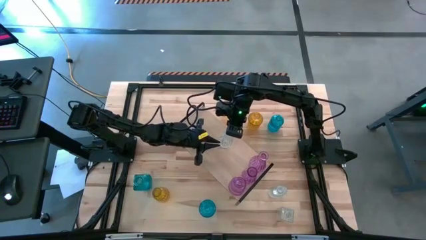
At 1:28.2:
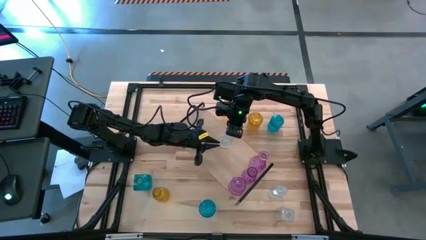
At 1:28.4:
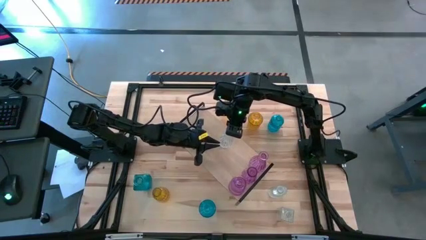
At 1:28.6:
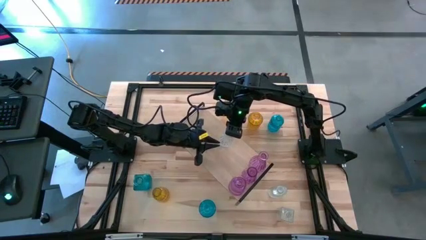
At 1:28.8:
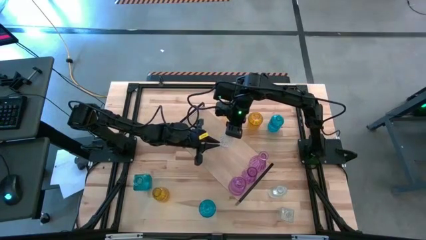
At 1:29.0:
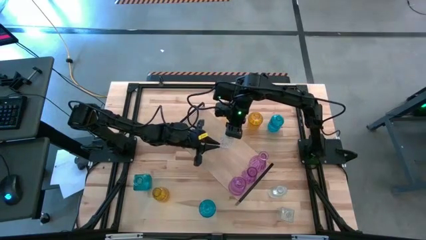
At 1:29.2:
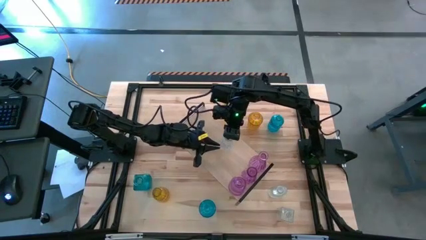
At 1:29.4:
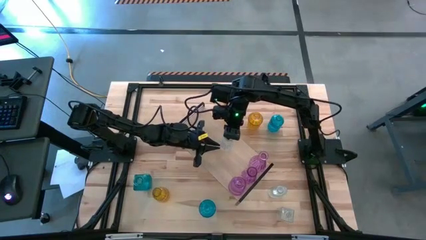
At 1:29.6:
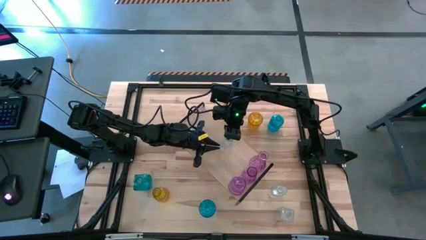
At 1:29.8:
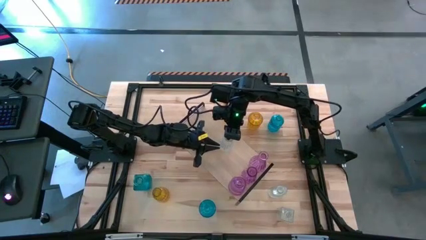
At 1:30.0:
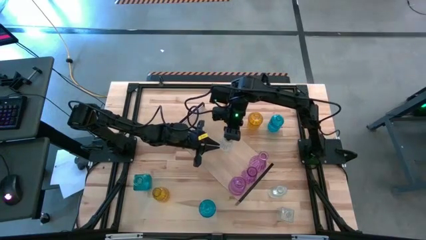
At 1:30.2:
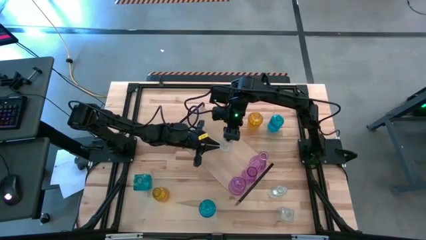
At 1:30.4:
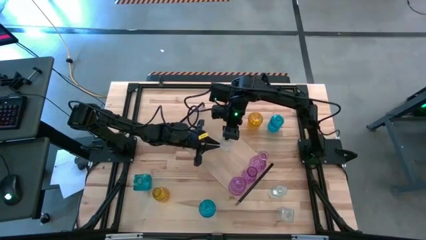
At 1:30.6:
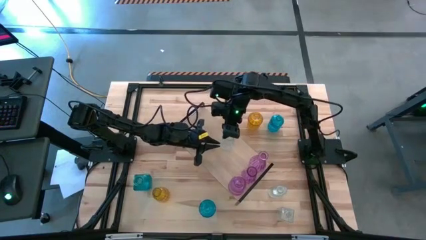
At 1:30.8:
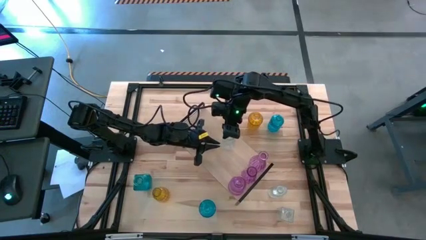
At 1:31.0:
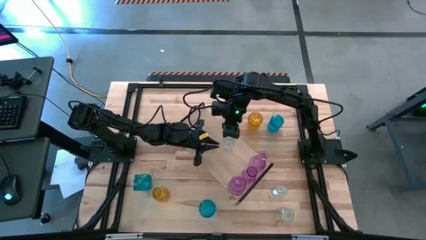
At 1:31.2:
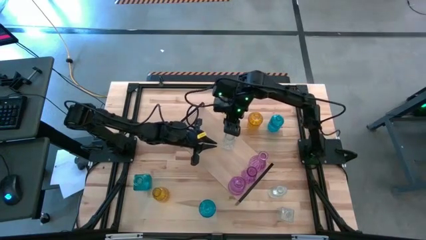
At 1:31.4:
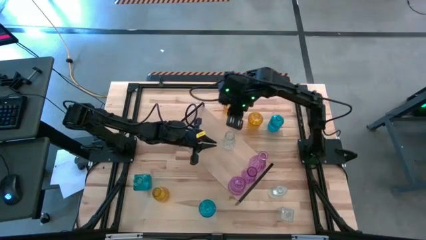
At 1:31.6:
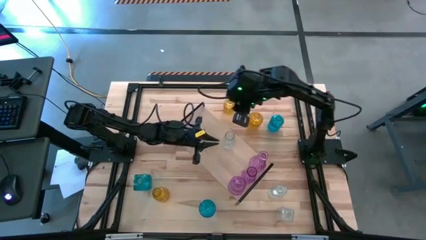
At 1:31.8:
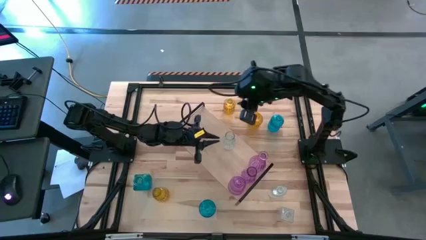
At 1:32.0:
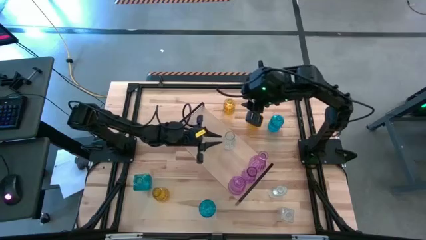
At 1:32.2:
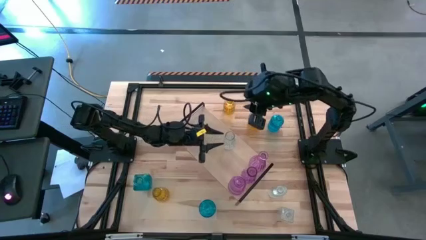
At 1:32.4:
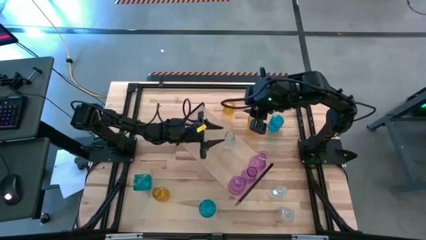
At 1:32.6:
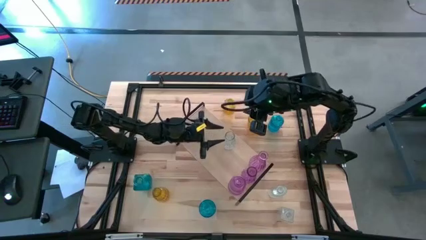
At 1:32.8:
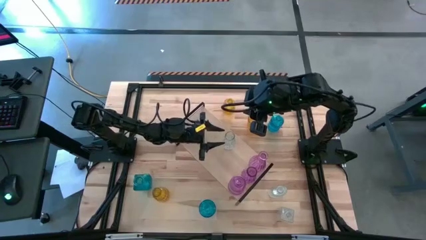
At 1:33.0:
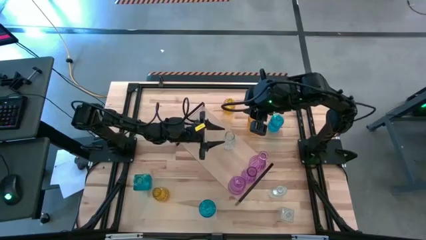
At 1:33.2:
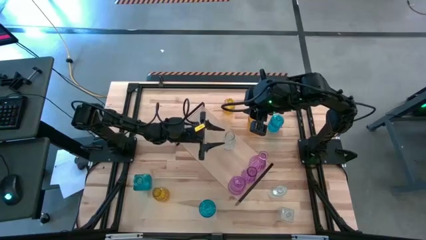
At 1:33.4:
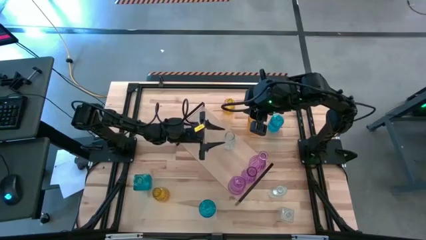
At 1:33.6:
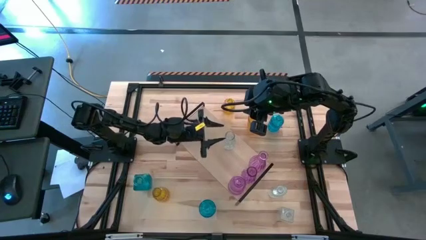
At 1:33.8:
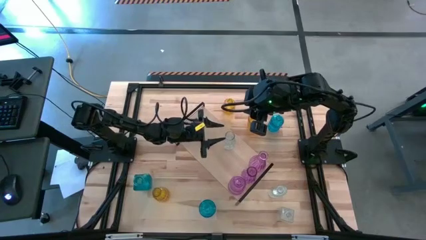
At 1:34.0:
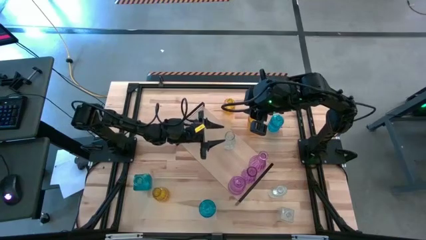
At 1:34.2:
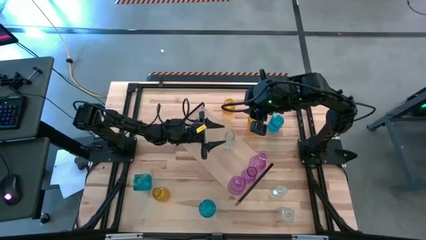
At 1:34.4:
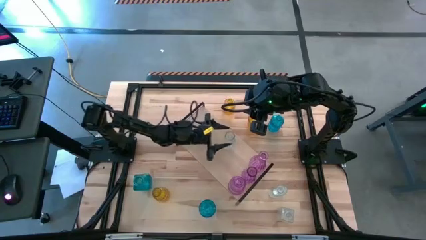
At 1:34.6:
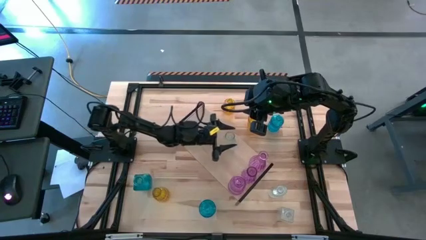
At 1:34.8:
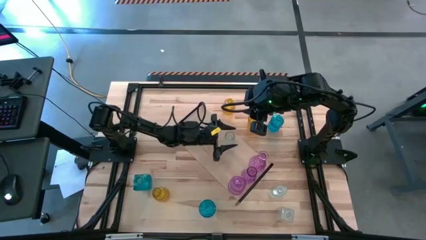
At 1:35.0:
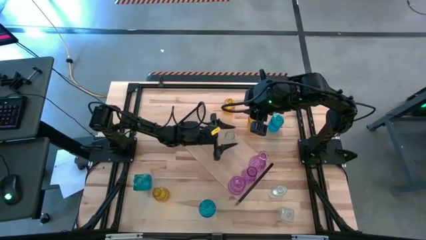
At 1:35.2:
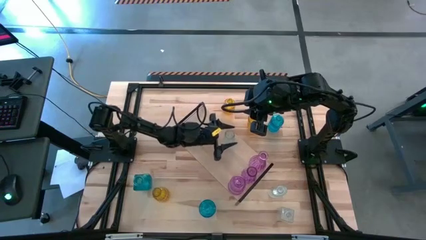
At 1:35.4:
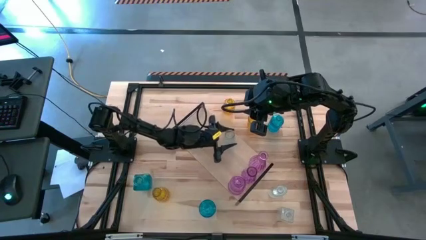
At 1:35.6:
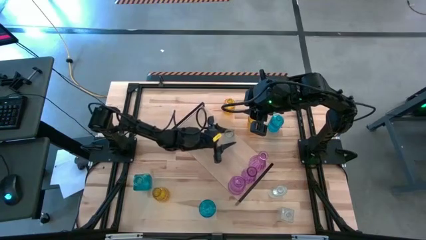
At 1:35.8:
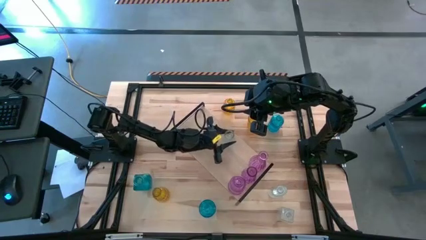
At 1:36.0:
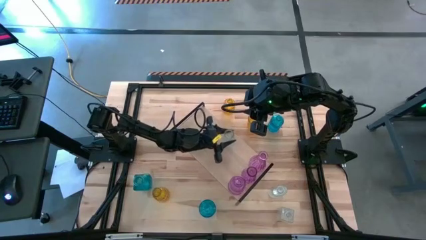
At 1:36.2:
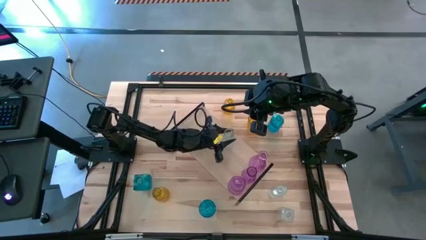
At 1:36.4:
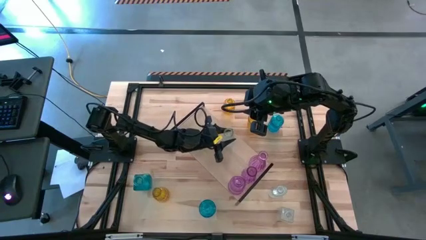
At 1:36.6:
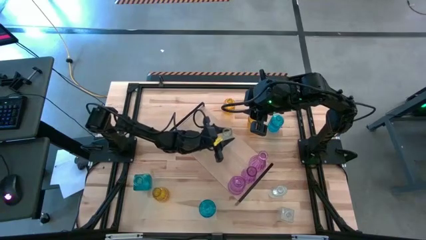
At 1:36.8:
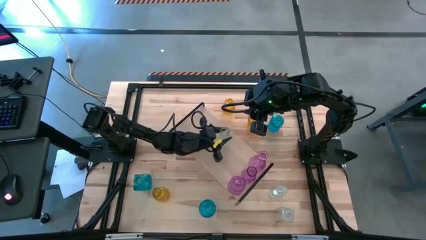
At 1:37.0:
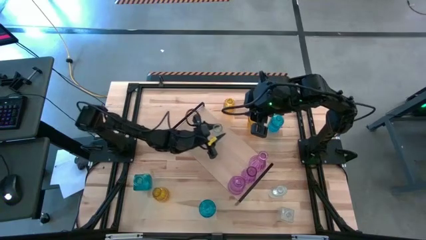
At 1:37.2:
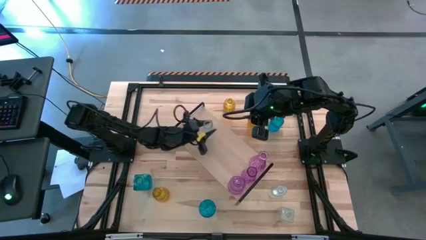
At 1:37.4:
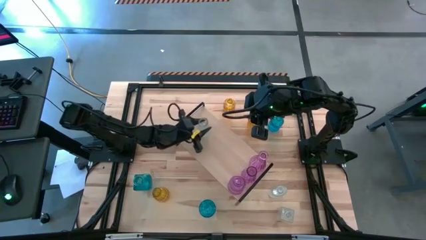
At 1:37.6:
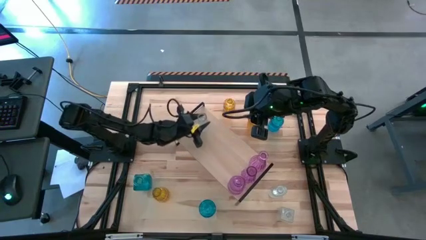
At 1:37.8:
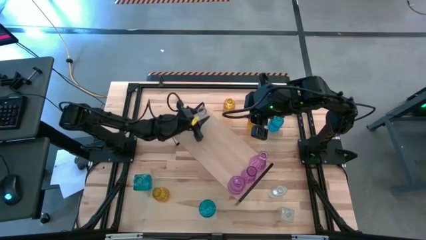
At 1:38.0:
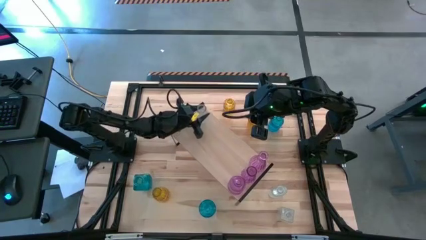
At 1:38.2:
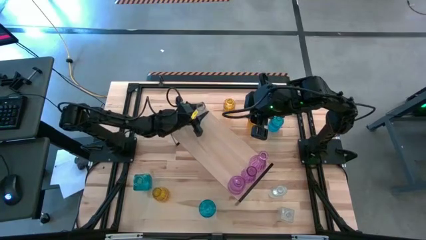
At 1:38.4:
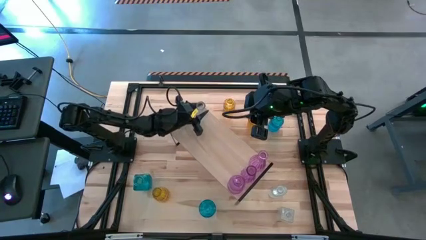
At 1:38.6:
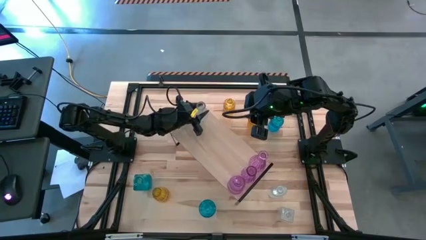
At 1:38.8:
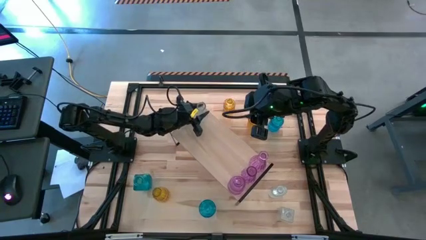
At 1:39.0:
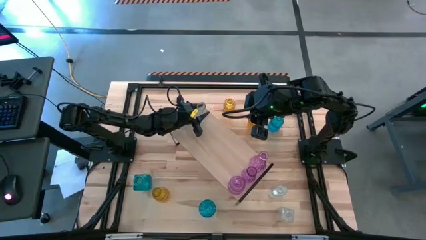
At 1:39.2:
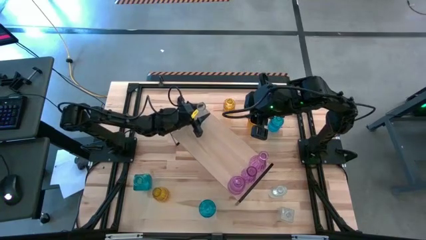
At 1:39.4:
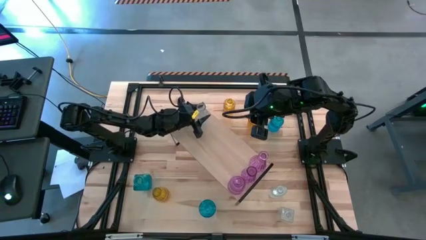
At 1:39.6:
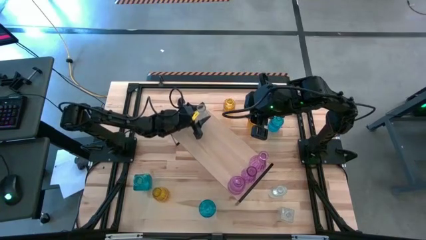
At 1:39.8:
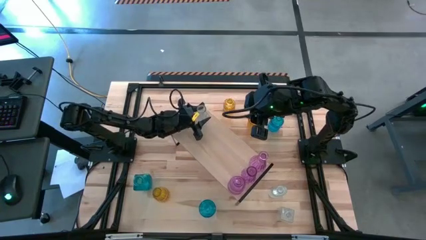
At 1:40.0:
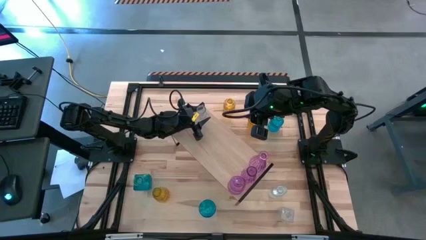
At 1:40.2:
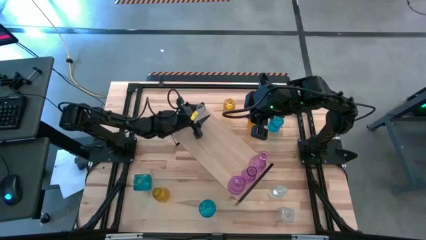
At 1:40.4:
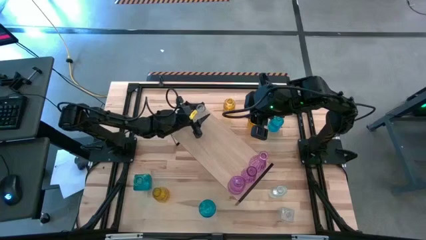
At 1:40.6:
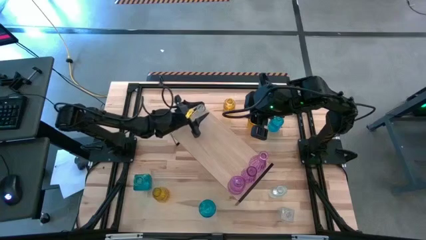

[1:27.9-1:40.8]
Task: sort vases onto shelf
Put the right transparent flower vase on the shelf

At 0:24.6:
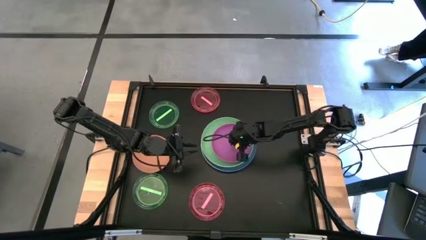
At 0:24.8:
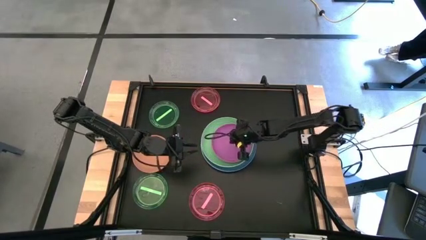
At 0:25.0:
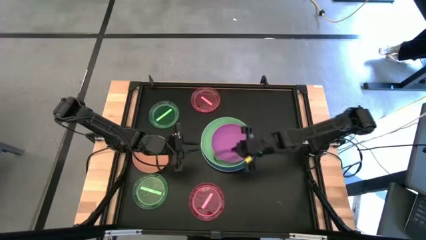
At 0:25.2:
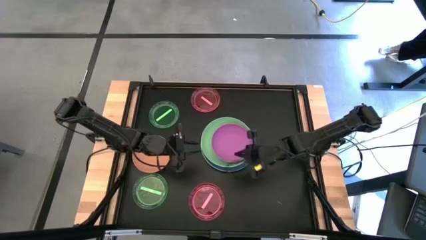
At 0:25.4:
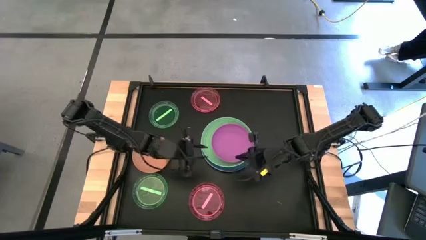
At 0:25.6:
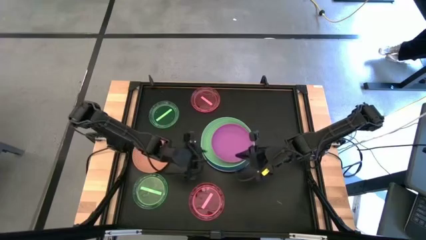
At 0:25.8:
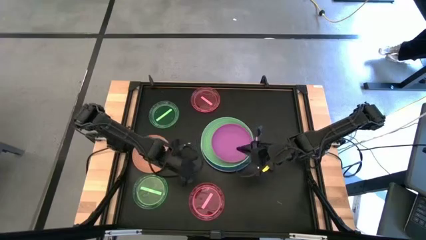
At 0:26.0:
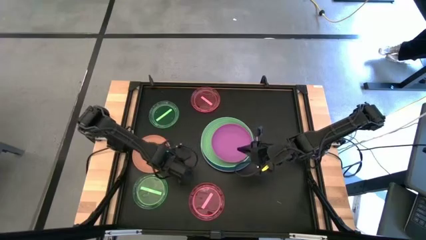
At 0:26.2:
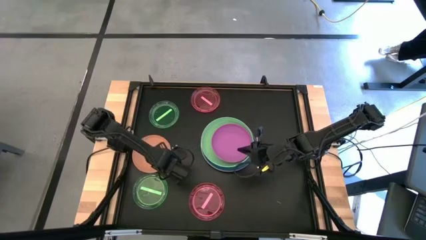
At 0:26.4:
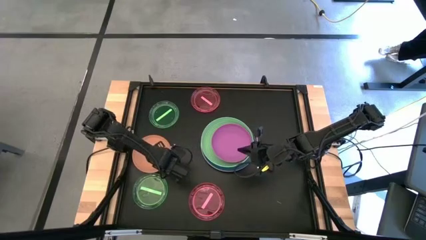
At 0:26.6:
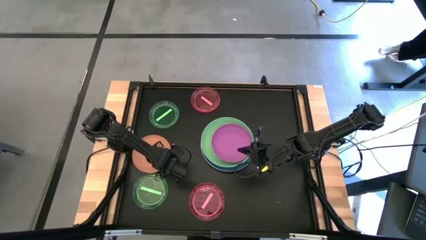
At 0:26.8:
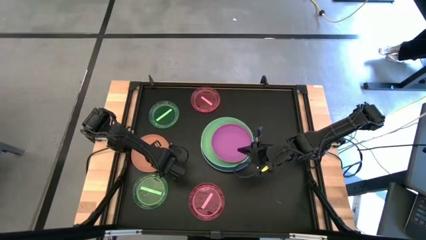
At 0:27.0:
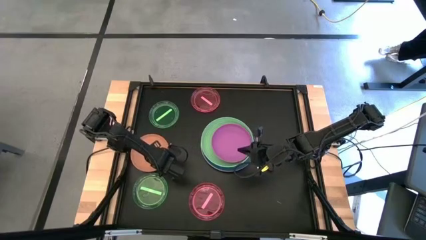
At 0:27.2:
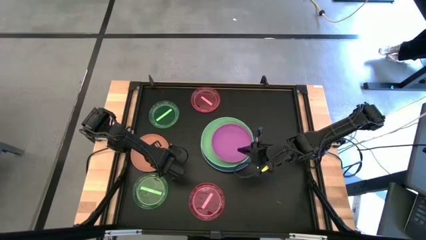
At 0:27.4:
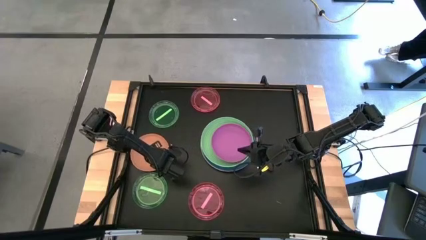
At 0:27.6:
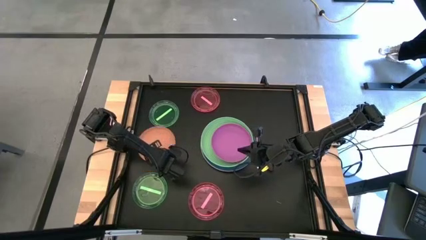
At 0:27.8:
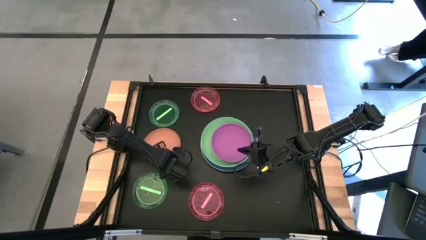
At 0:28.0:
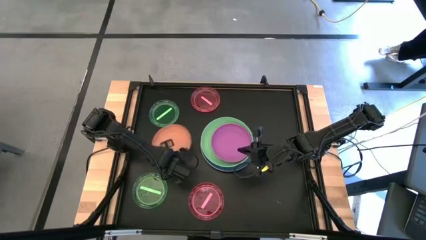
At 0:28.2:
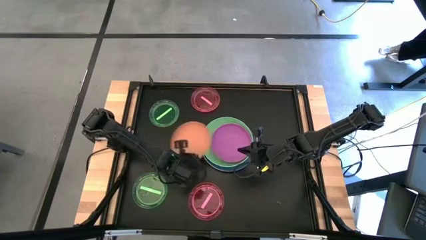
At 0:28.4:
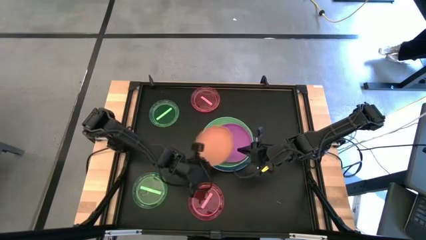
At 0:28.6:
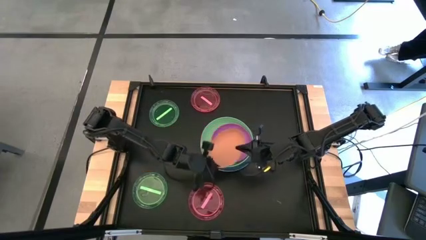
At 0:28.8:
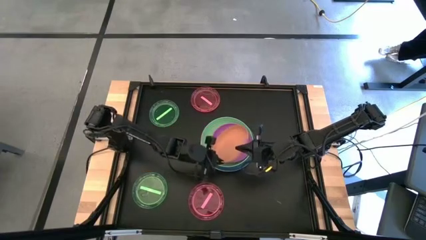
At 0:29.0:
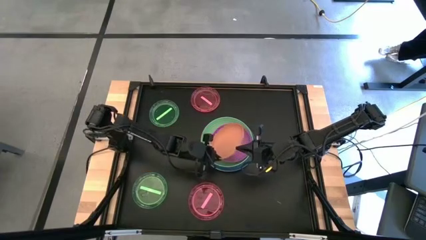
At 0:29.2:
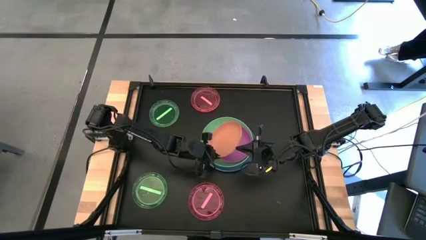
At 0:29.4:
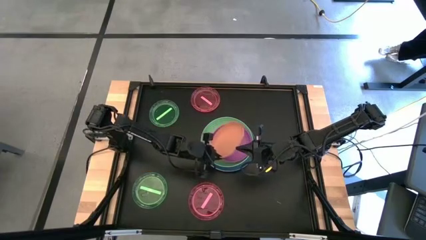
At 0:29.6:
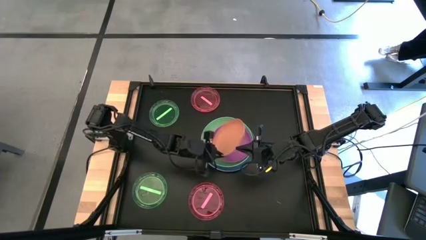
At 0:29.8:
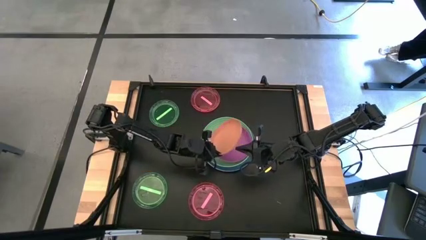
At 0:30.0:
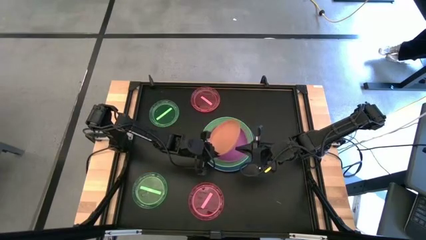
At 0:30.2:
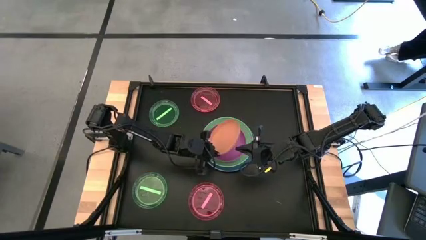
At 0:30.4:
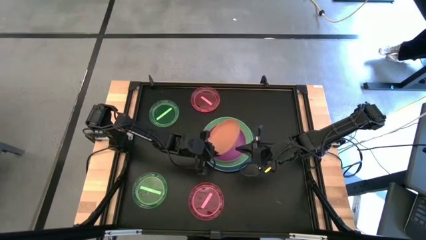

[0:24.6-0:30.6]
Task: Stack plastic plates
Stack the orange plate on top of the purple plate
